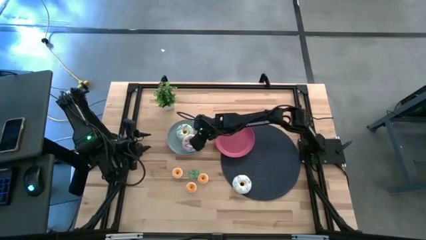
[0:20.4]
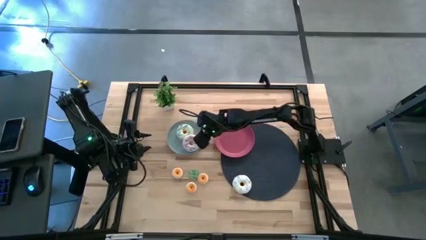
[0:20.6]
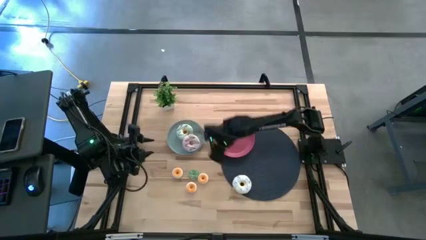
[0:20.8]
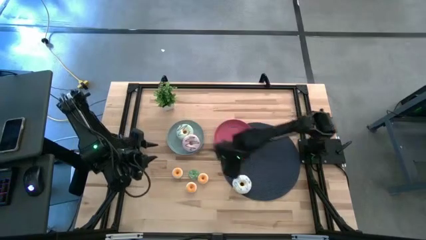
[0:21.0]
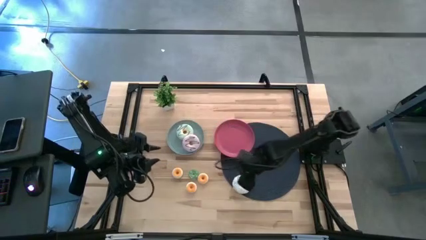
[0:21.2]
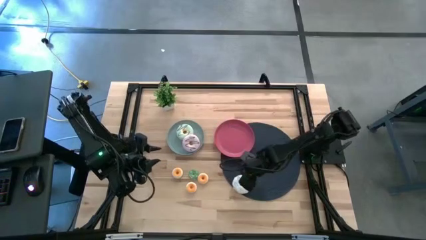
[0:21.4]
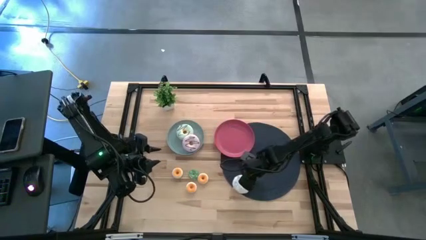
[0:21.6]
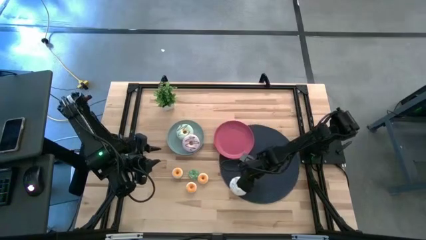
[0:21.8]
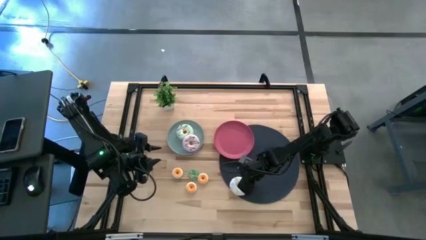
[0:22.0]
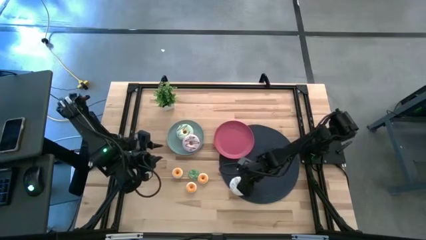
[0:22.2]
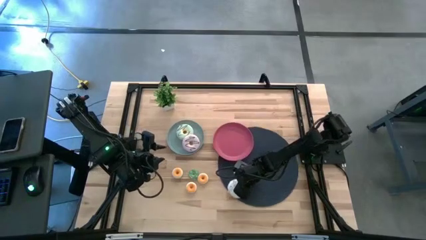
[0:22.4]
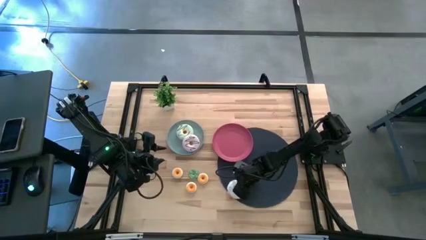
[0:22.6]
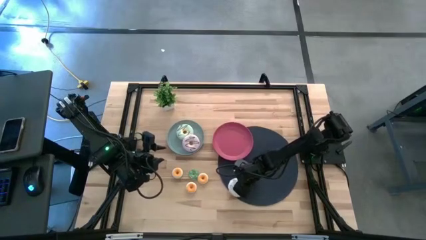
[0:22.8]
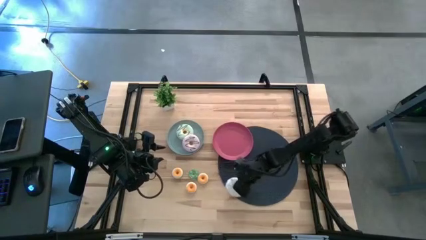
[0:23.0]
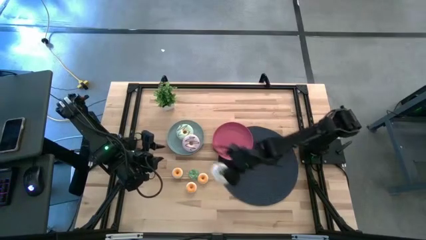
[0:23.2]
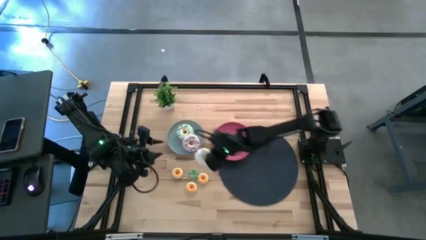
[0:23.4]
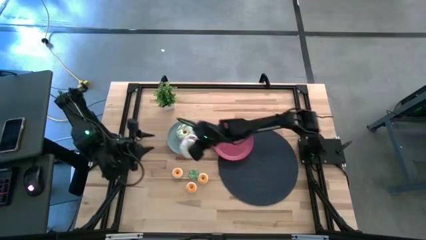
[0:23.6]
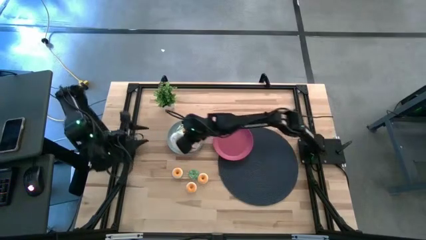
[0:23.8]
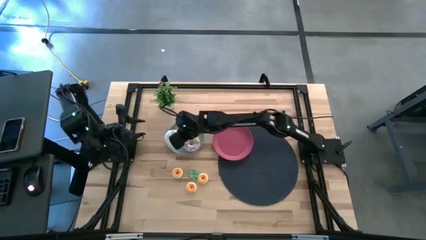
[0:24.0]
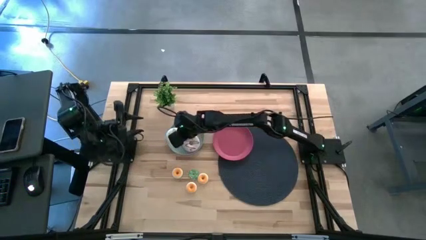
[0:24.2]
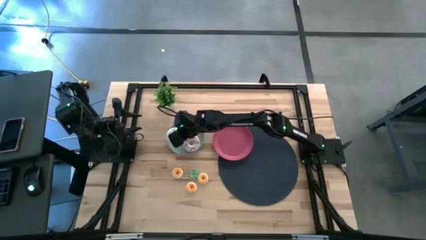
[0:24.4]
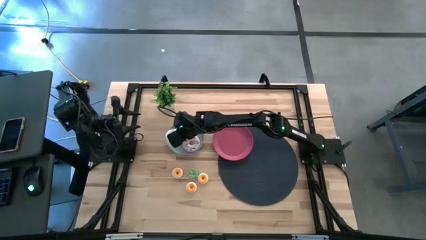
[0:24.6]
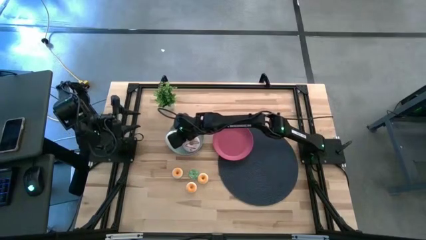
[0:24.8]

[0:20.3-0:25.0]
Task: Pick & Place donuts
Put the large white donut on the gray plate

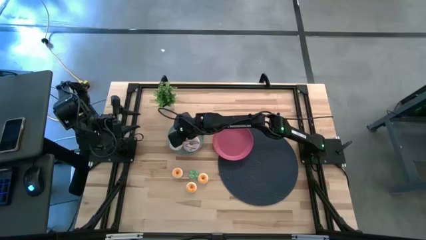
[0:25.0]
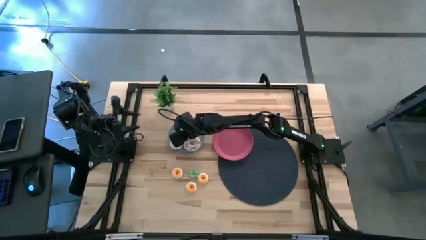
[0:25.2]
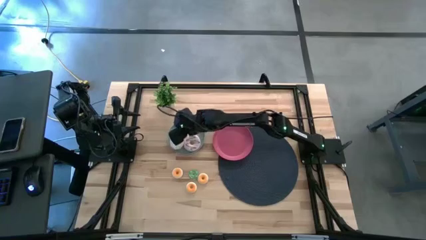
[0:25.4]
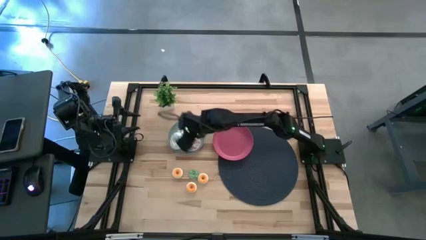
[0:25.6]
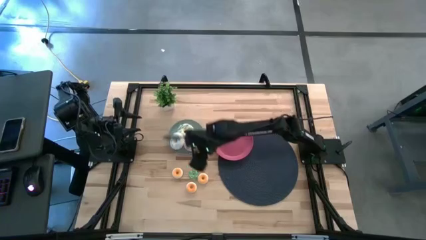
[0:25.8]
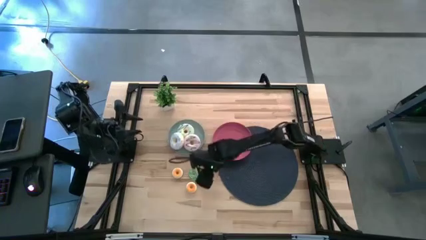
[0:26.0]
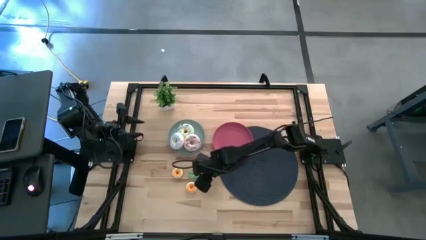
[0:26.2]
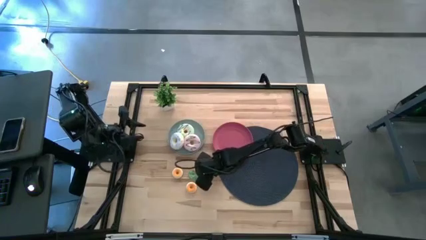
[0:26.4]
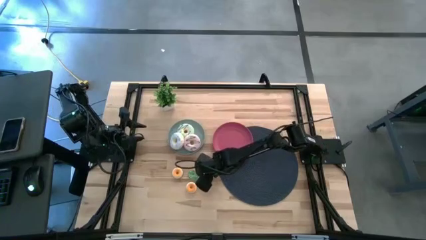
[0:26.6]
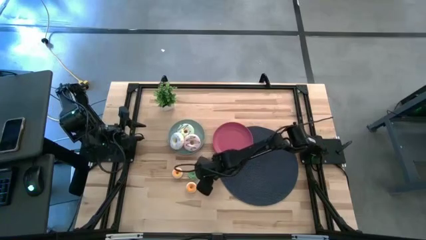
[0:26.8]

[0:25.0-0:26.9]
Put the small yellow donut on the red plate

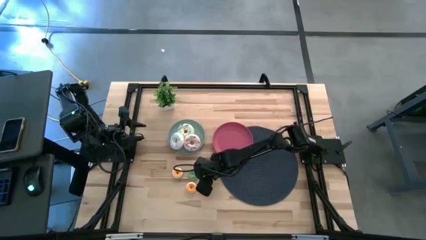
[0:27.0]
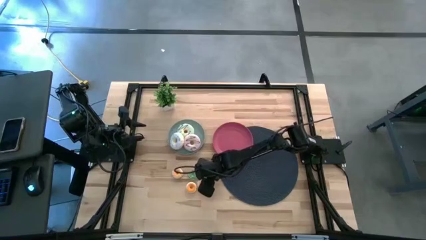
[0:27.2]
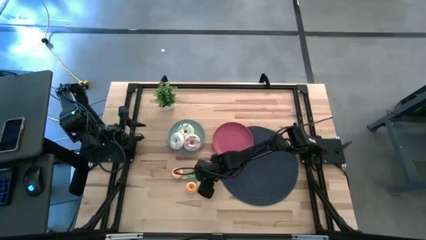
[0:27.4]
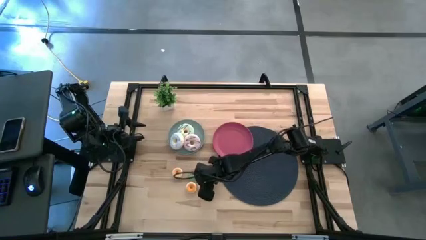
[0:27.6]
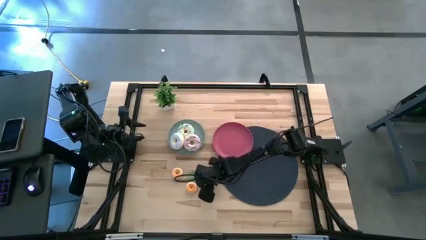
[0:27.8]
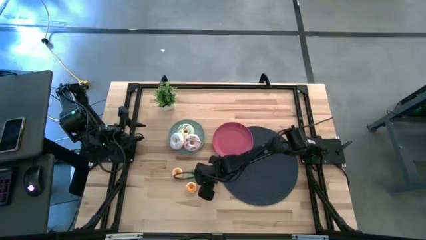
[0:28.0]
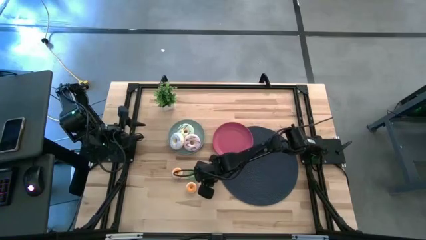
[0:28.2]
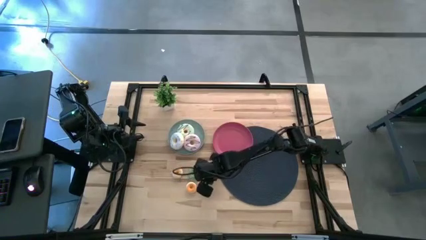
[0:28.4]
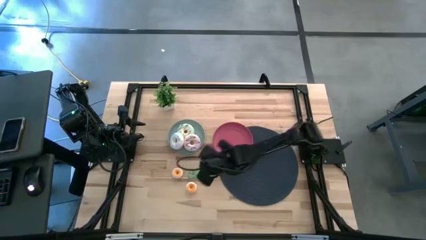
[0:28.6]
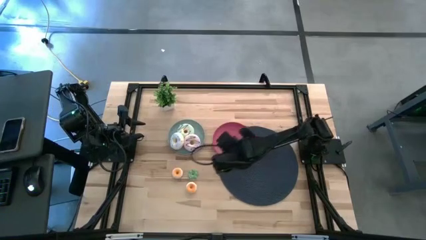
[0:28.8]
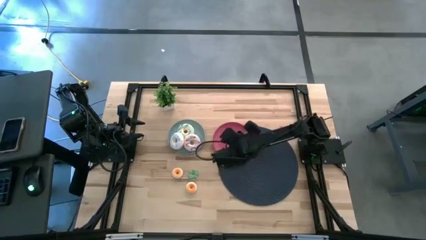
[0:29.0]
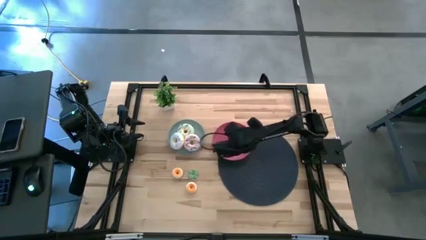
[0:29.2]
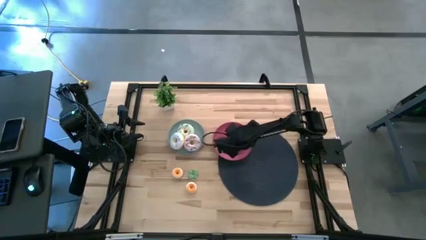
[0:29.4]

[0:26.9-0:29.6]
Put the small yellow donut on the red plate

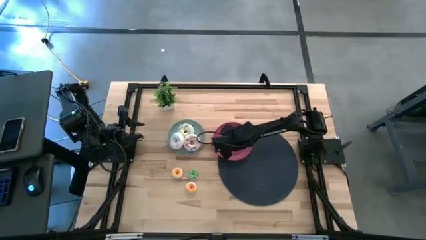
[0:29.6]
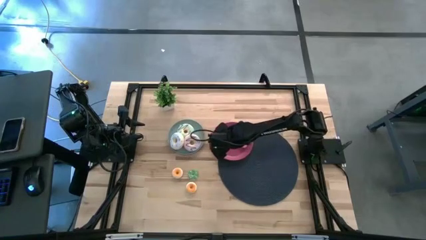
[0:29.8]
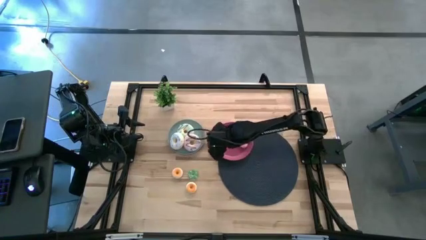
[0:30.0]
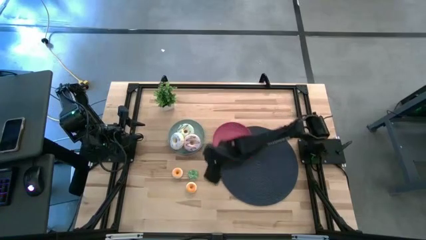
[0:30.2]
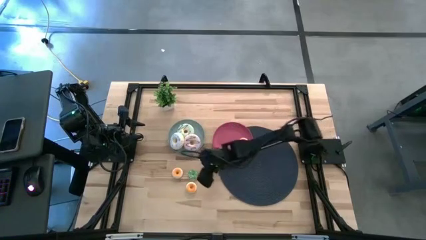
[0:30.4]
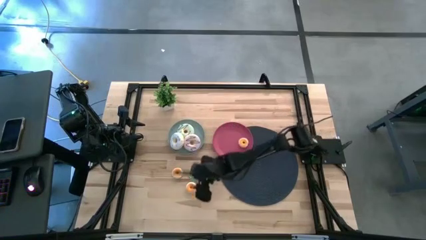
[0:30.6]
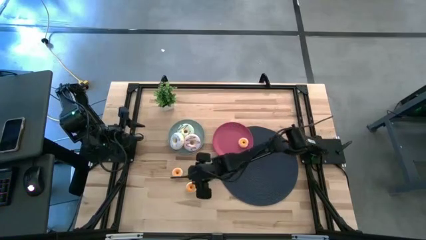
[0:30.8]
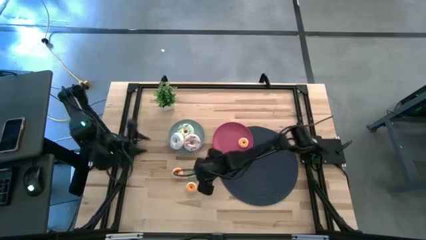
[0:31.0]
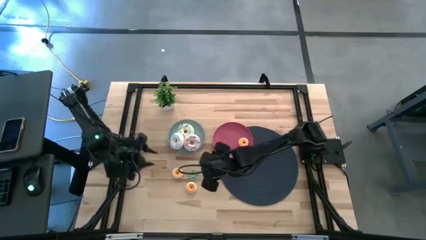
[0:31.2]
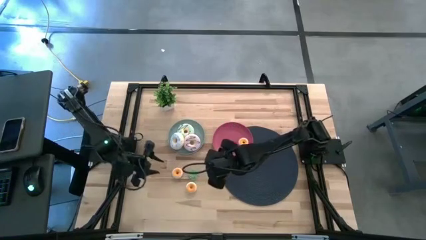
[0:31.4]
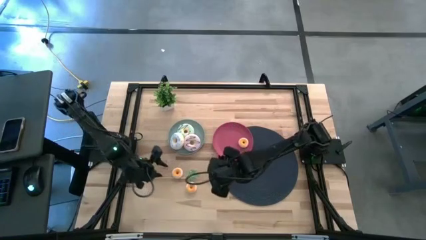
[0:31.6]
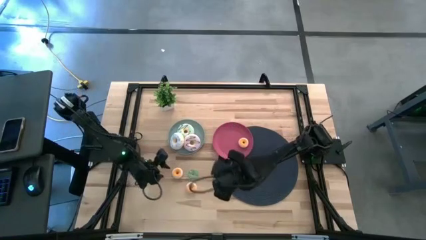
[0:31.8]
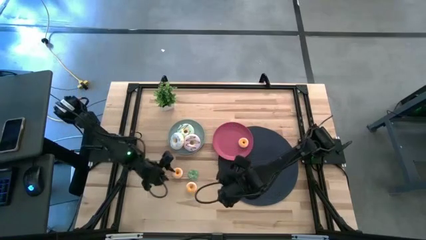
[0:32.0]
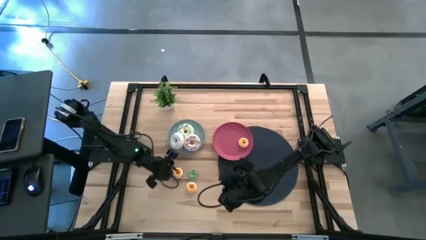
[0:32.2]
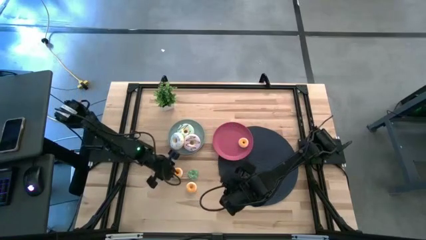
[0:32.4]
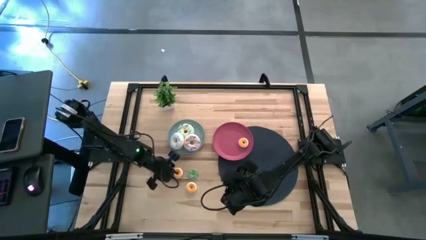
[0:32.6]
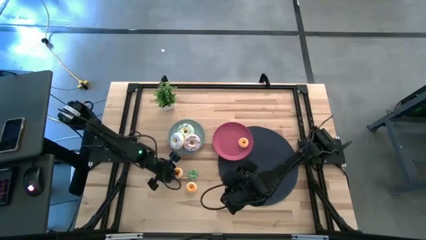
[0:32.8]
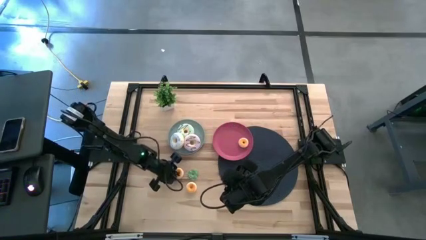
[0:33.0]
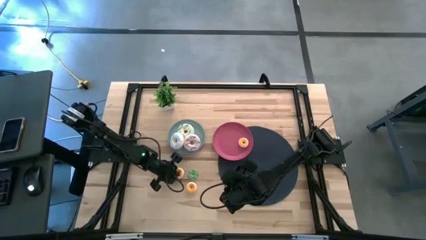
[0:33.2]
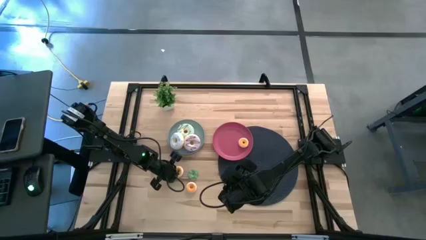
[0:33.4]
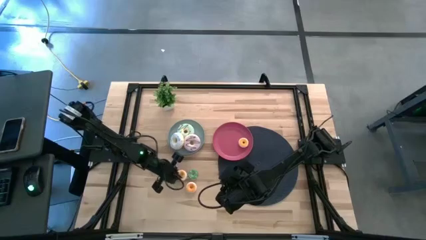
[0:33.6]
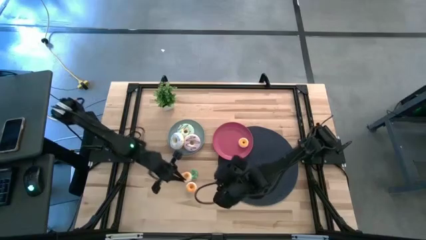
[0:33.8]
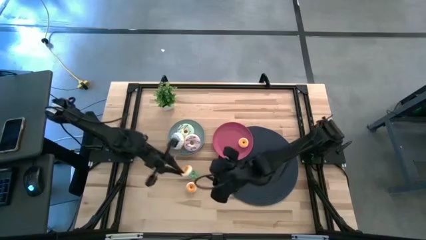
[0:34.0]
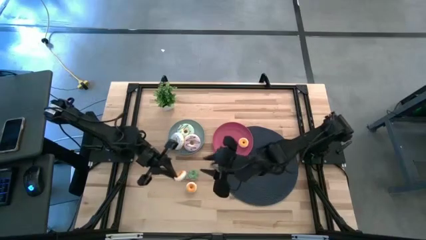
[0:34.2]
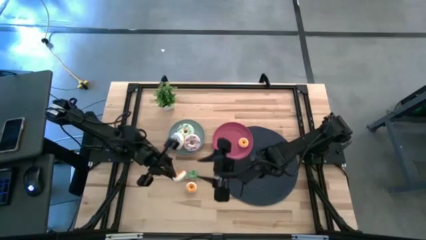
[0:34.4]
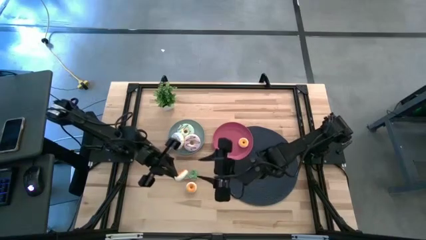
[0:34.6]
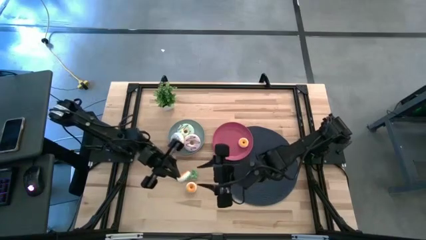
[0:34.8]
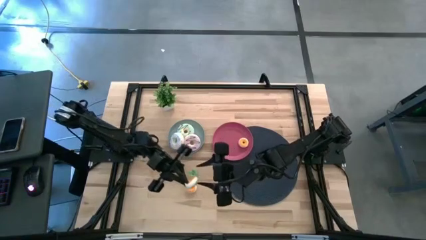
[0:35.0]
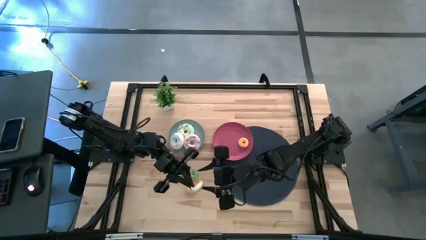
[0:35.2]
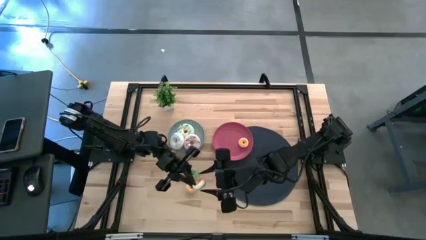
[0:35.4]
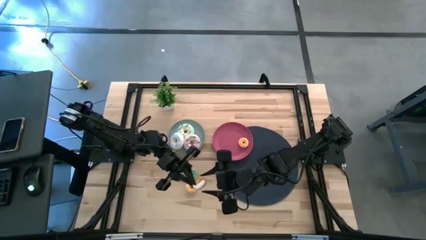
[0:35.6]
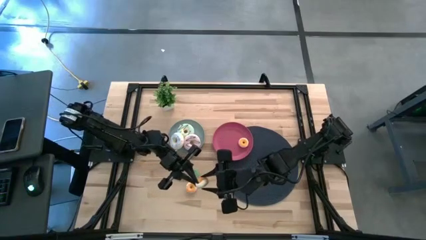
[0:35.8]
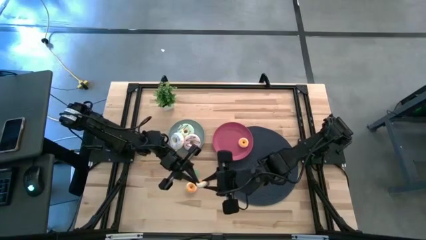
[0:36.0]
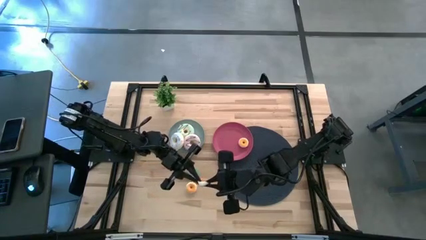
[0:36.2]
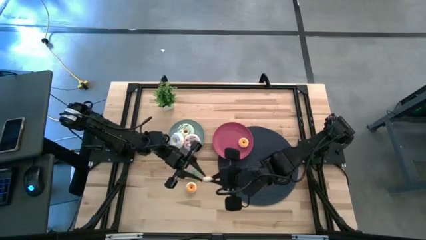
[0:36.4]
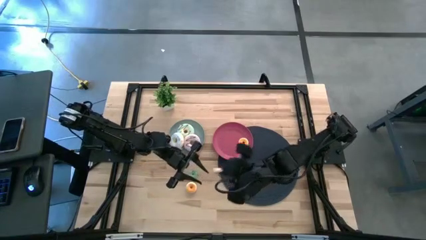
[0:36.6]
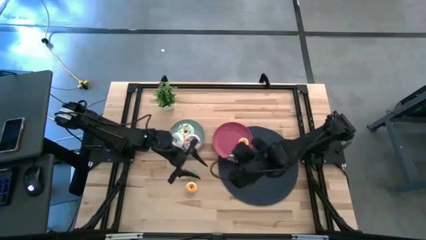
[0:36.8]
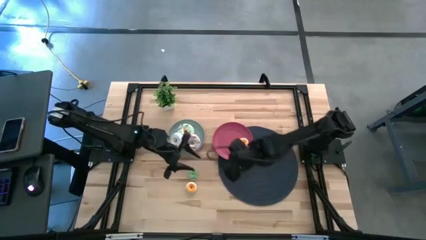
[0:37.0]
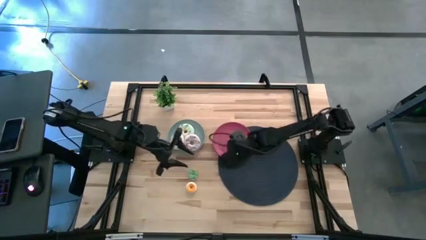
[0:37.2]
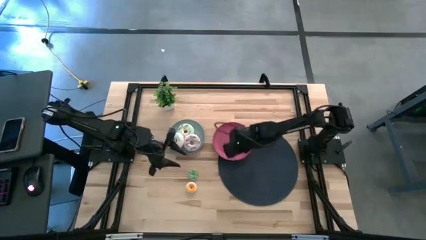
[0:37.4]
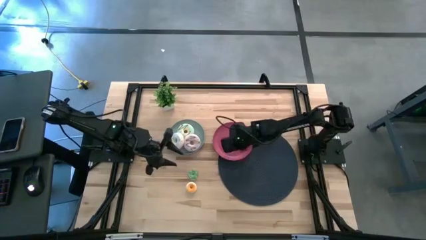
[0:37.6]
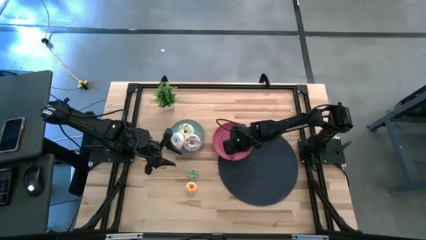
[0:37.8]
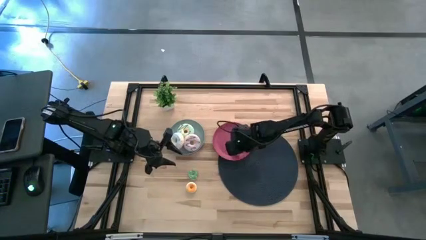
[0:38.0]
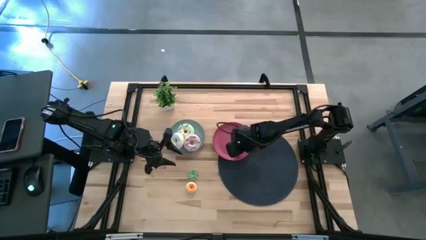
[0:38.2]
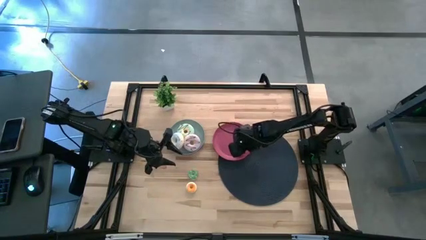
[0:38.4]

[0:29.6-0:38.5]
Put the small green donut on the red plate
